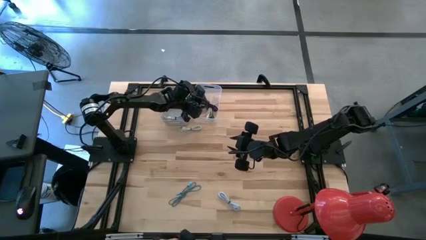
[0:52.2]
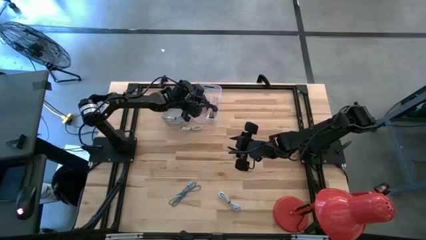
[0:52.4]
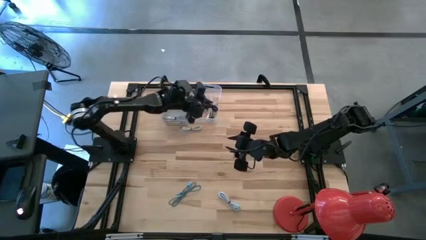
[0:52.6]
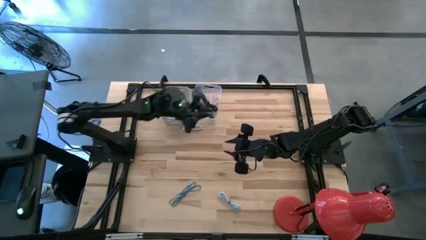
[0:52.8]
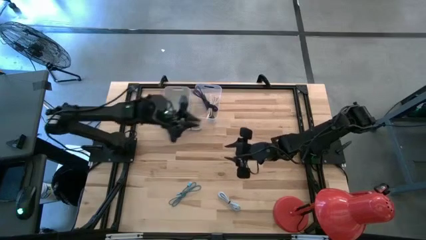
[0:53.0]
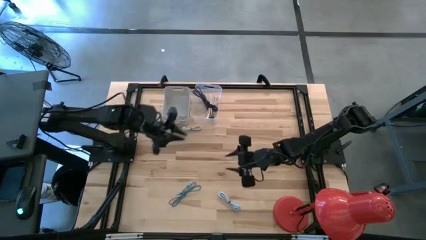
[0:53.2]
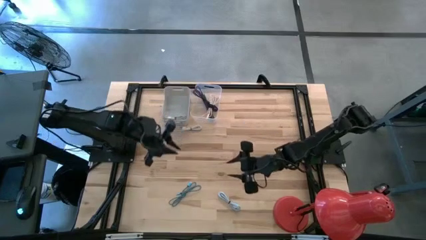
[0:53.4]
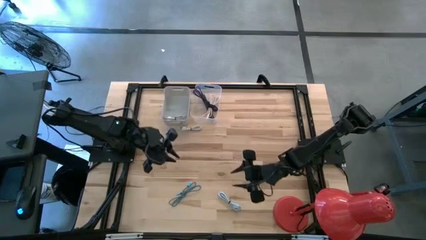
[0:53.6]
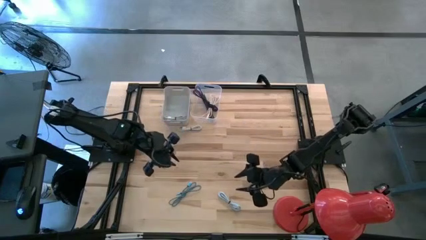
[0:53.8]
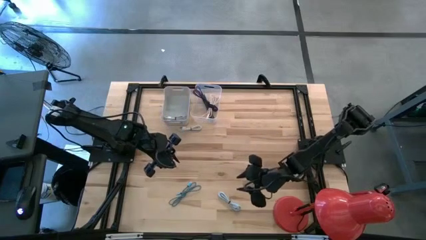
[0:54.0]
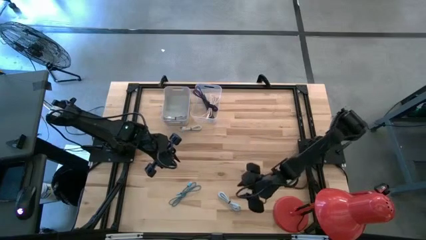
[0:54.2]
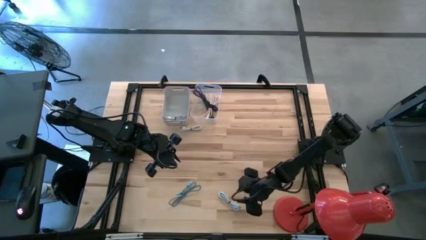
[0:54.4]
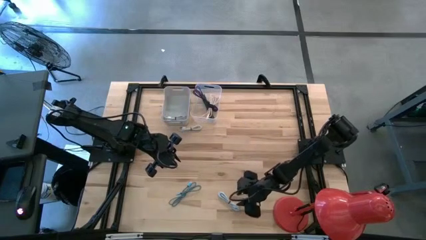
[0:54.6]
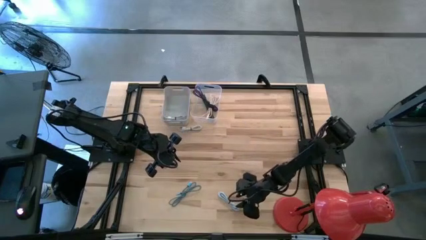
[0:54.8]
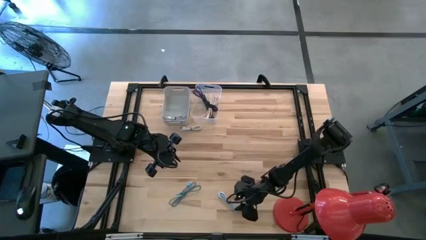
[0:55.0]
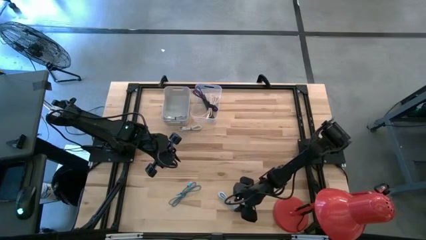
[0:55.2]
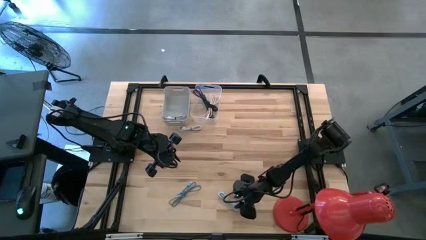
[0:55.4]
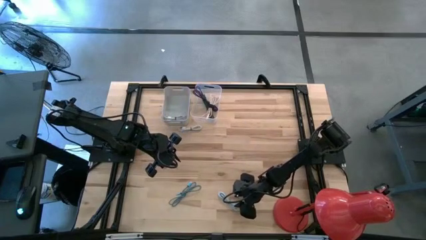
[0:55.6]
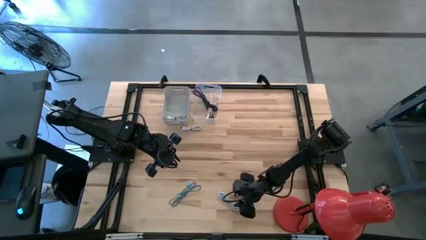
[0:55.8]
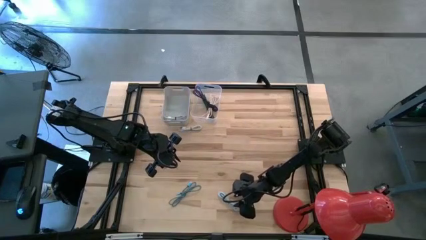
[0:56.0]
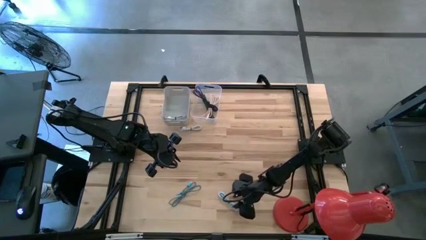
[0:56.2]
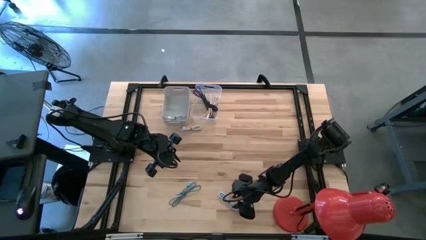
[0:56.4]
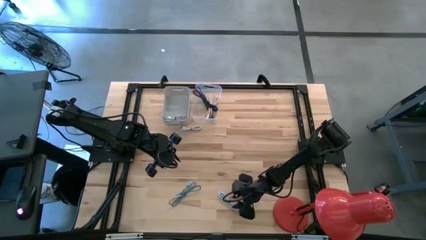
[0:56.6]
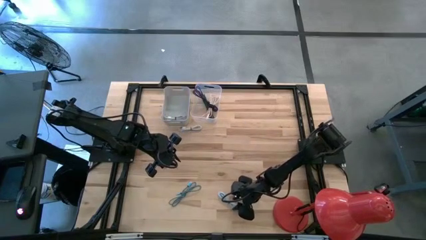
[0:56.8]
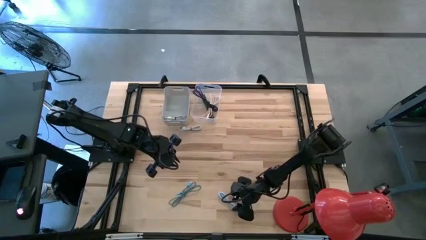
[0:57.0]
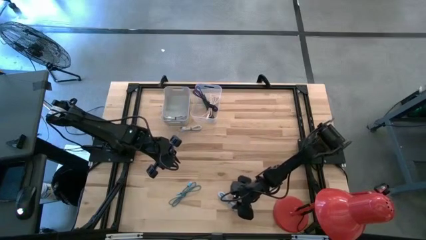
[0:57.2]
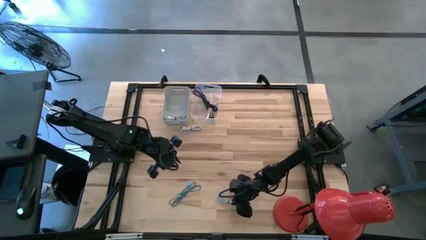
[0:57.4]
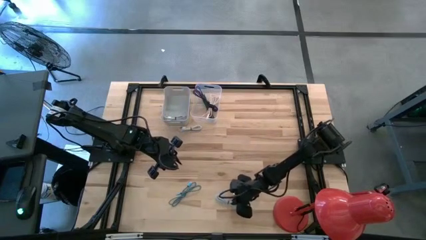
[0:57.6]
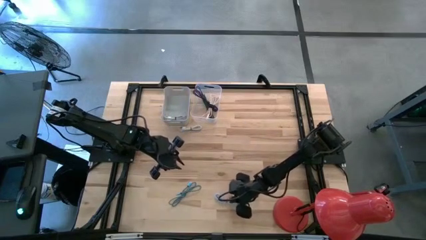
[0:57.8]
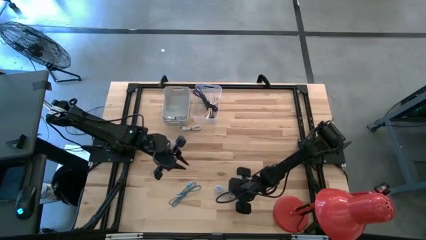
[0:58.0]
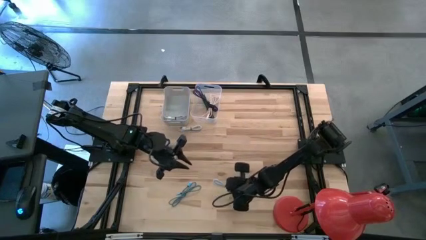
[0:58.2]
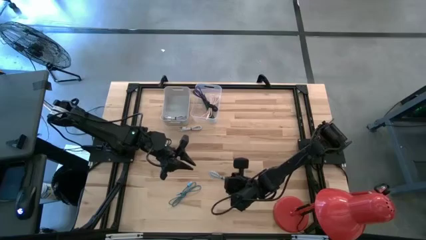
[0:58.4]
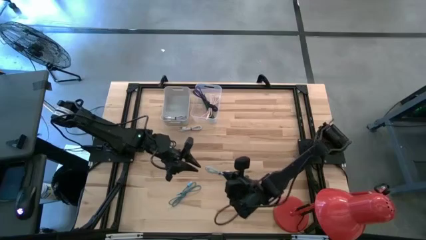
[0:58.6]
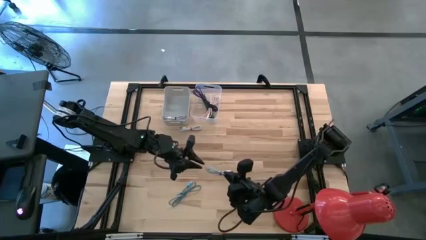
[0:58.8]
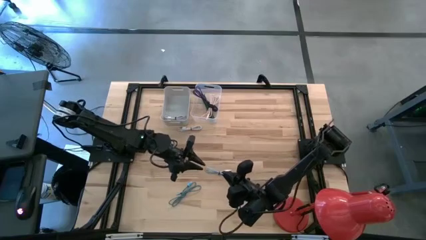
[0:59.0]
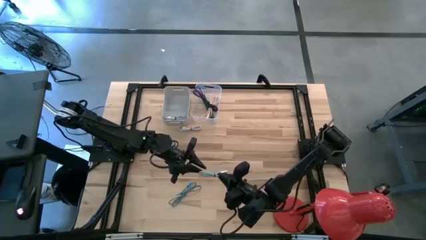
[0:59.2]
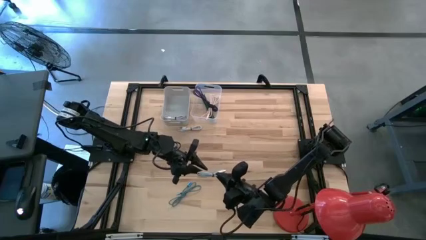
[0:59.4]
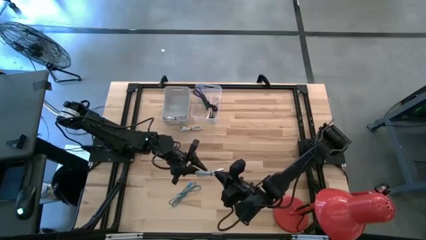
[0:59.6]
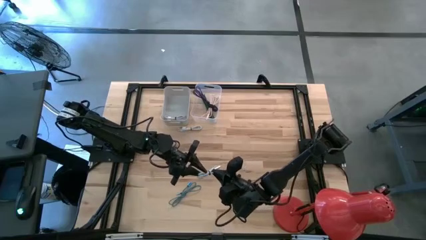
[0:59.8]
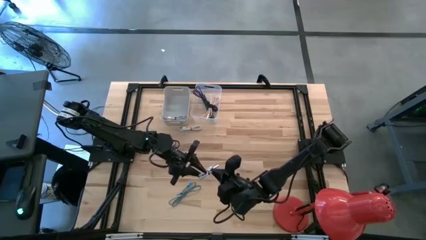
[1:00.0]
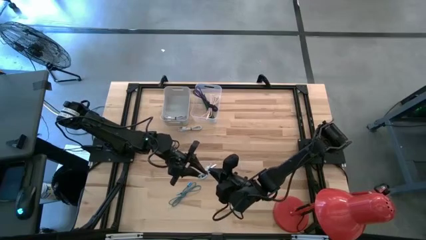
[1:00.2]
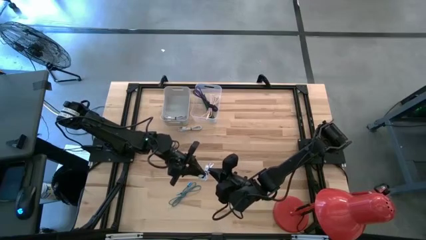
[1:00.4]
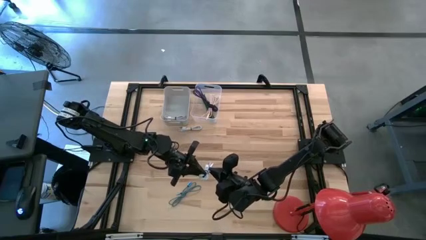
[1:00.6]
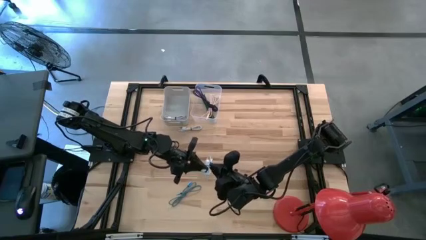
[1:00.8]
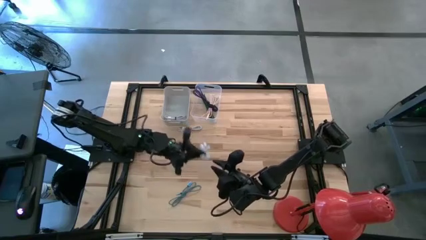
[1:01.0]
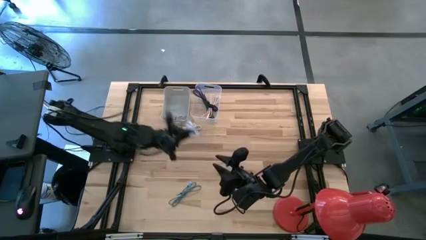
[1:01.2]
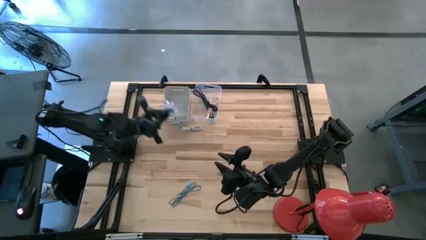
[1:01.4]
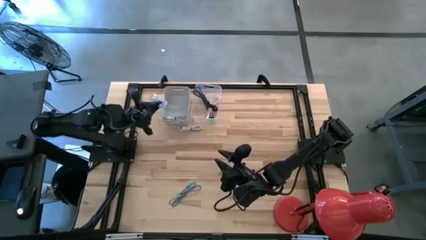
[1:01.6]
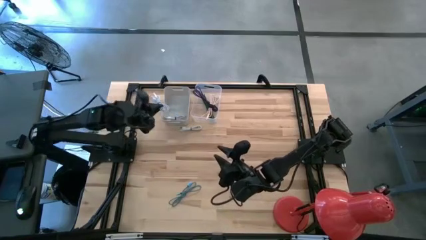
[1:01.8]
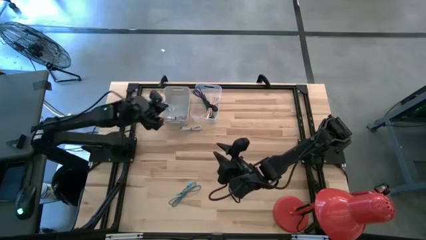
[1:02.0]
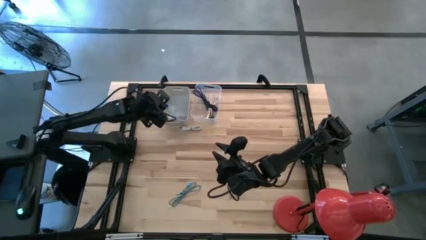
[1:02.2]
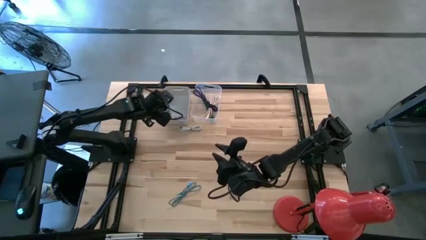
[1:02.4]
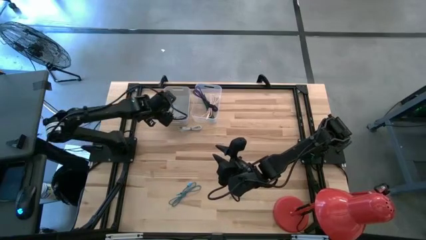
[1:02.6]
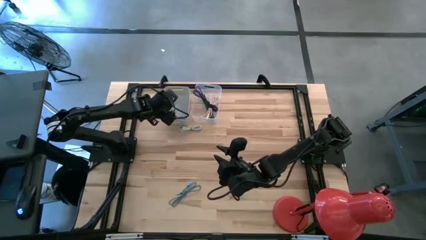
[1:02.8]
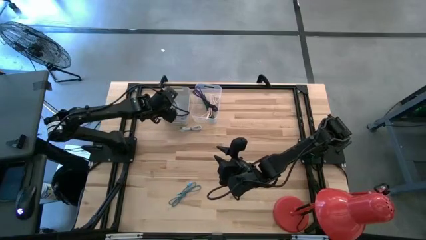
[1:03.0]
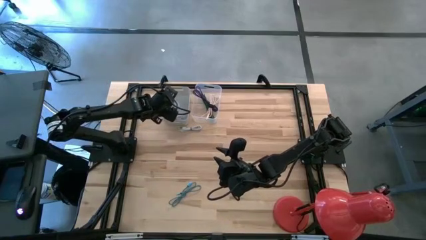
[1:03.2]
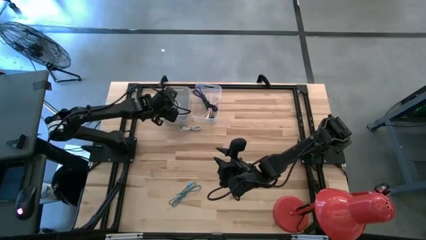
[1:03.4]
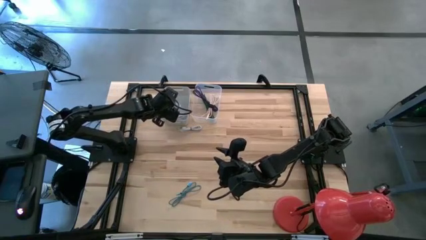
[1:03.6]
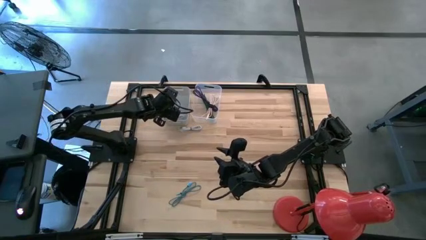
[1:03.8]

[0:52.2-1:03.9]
Task: Pick & Place USB Port
Put the blue charger cable into the gray bin

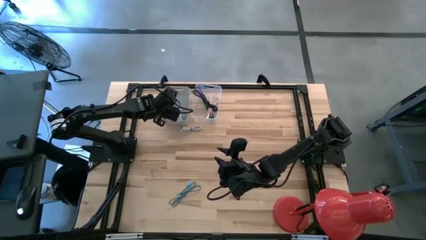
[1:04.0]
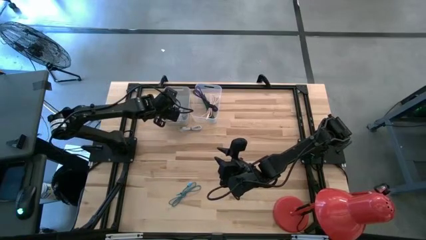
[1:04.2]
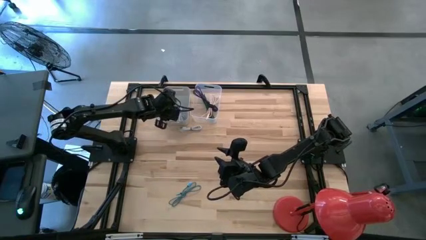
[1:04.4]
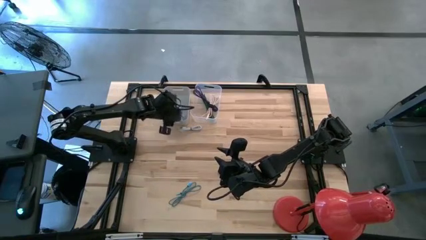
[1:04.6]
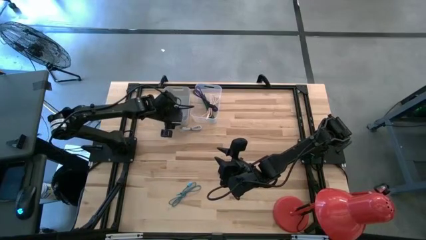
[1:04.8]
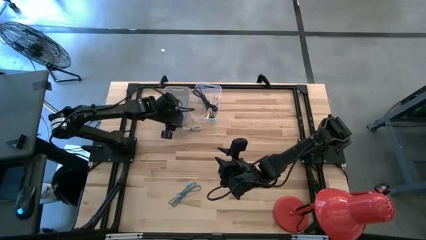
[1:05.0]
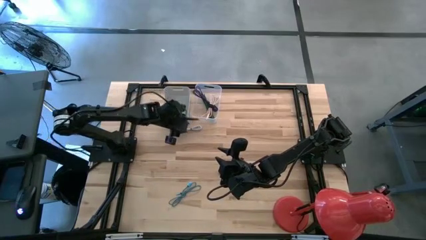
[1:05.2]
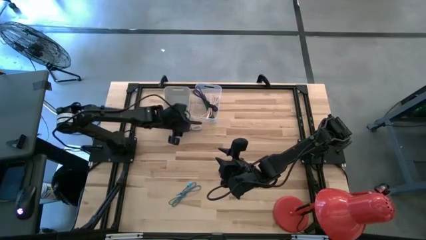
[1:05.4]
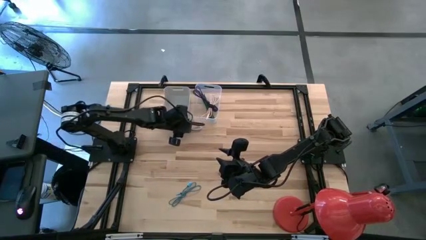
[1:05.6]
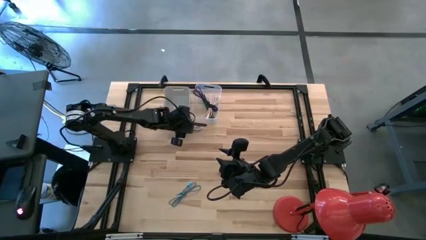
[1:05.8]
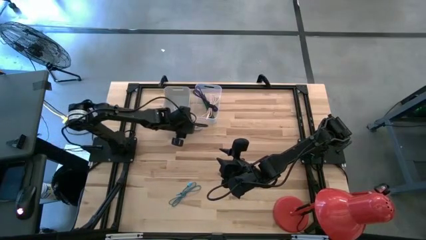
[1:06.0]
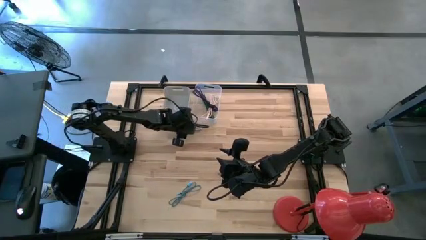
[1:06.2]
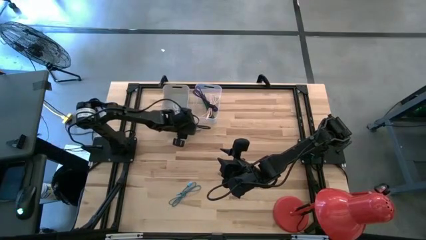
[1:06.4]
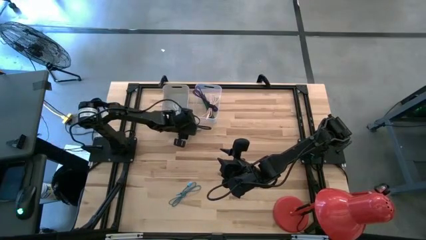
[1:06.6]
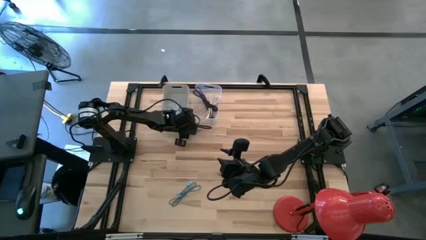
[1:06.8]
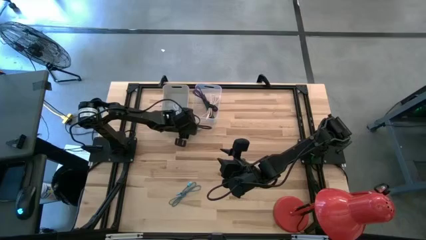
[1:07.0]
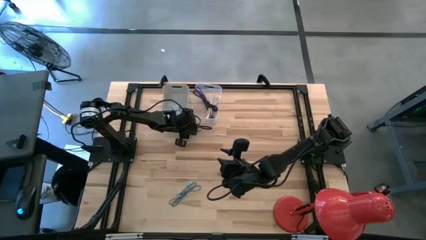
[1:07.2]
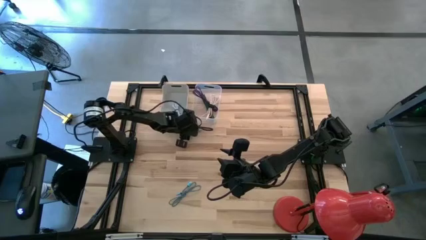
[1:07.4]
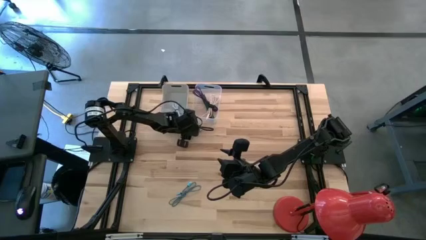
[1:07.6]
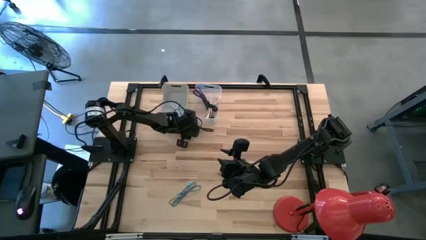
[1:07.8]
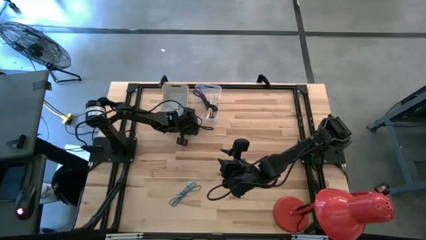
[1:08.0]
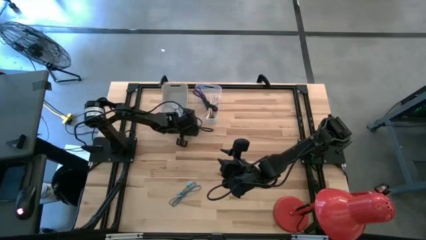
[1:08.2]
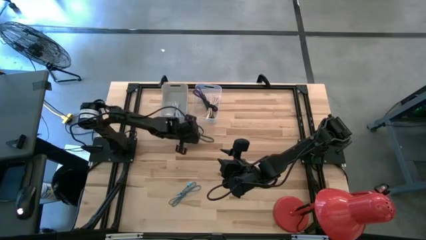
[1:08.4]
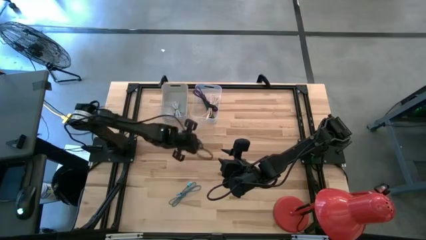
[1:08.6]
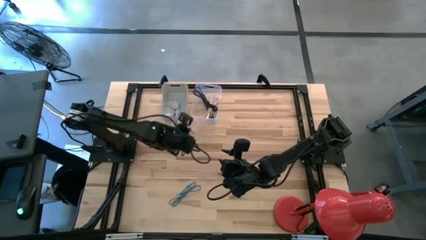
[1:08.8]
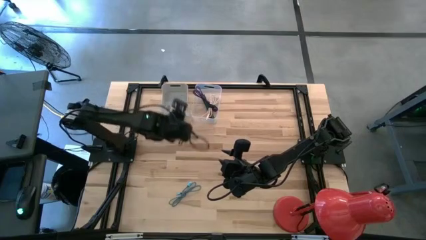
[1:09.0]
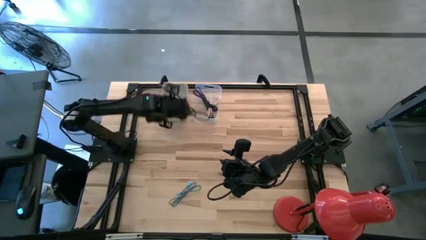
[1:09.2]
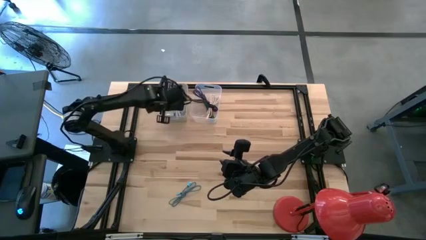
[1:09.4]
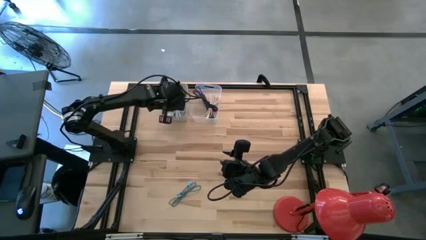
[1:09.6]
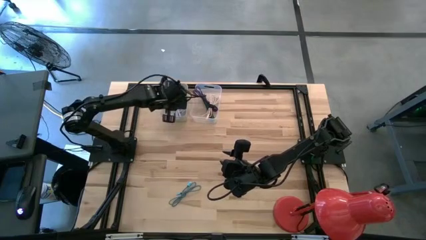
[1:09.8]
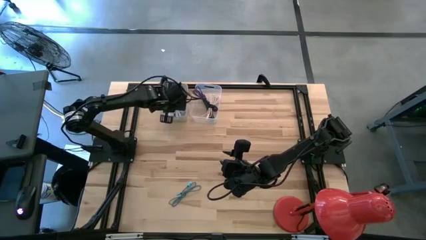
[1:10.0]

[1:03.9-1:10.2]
Put the white charger cable into the gray bin
